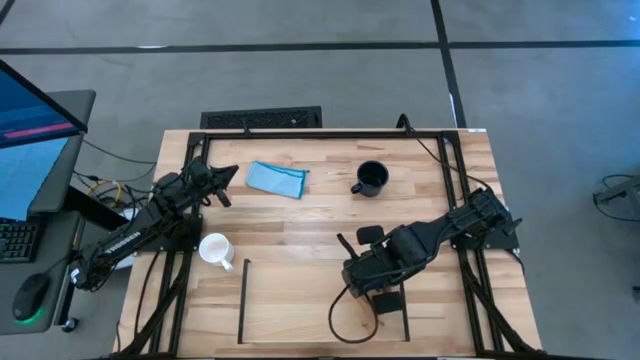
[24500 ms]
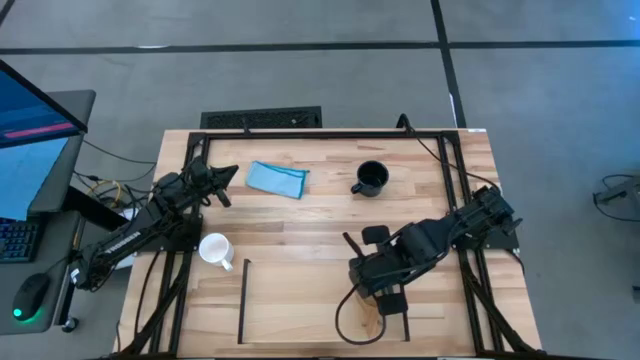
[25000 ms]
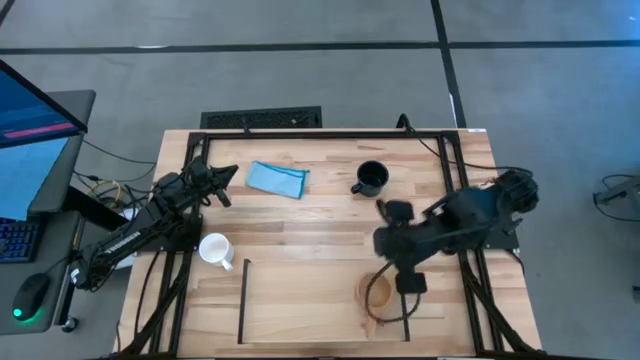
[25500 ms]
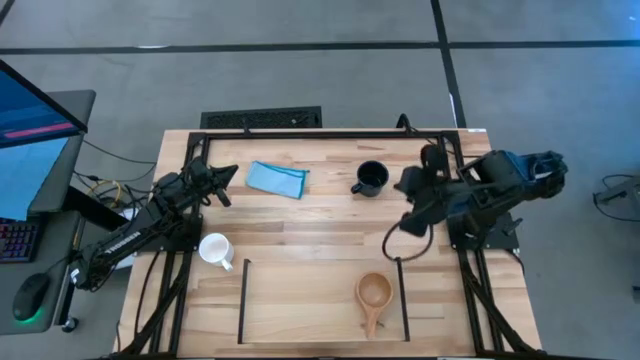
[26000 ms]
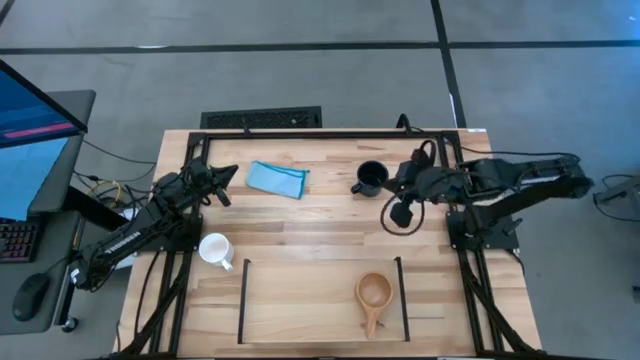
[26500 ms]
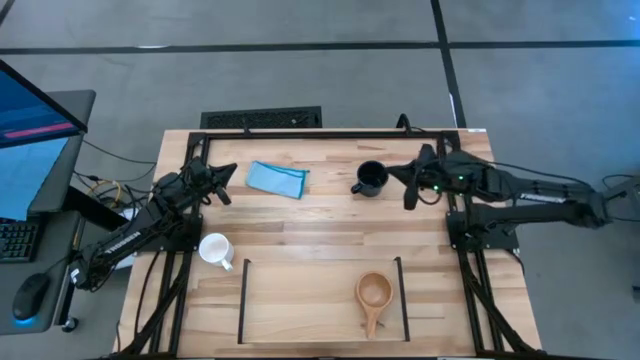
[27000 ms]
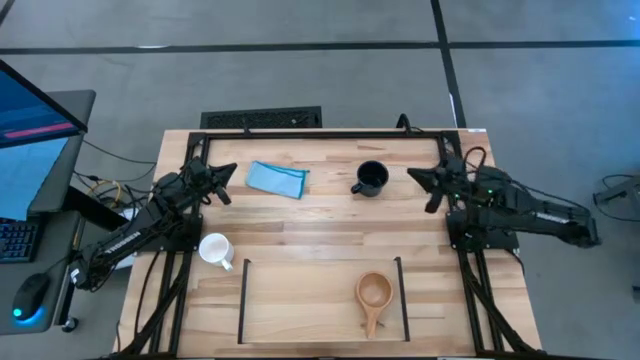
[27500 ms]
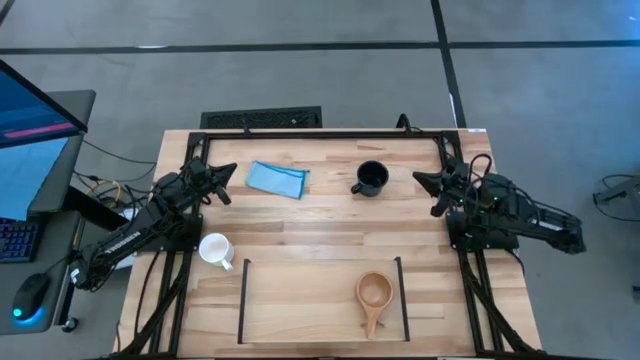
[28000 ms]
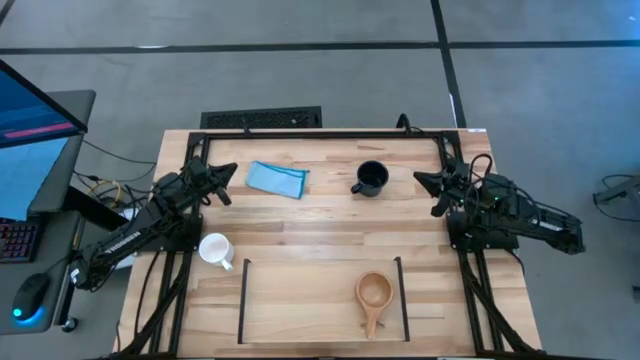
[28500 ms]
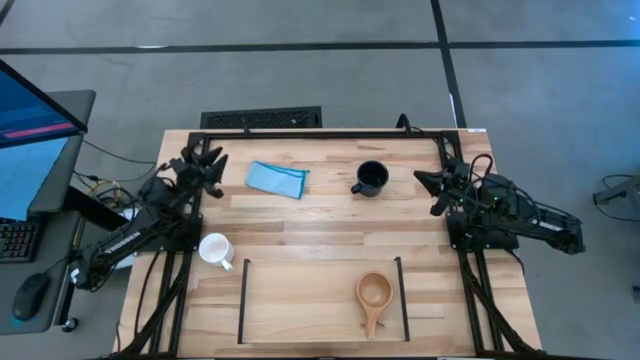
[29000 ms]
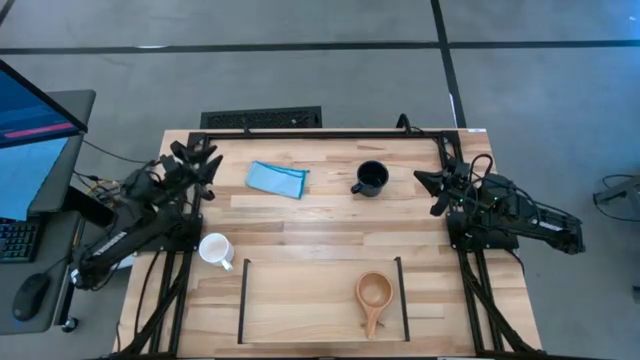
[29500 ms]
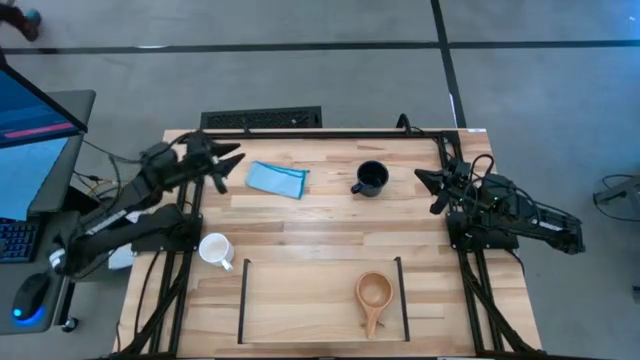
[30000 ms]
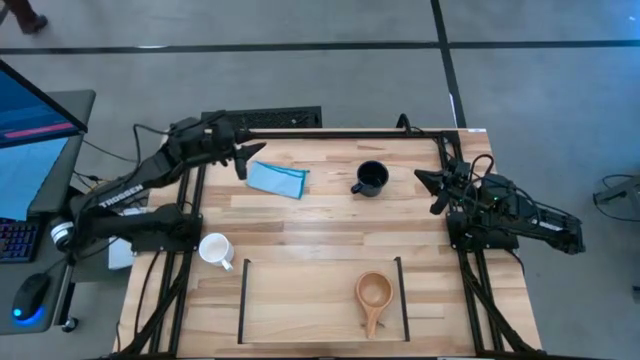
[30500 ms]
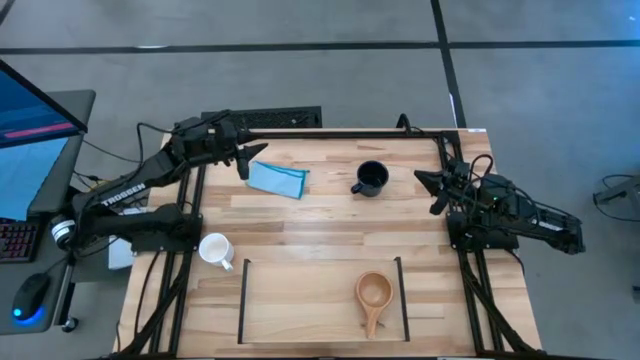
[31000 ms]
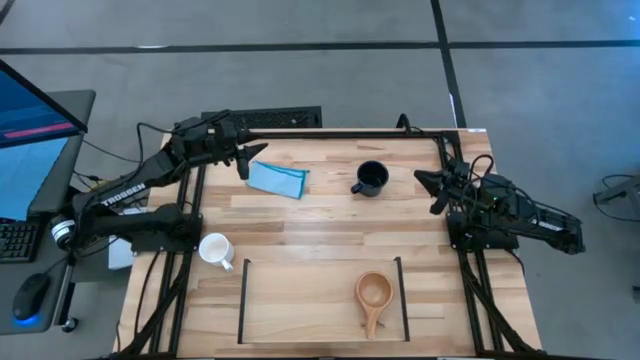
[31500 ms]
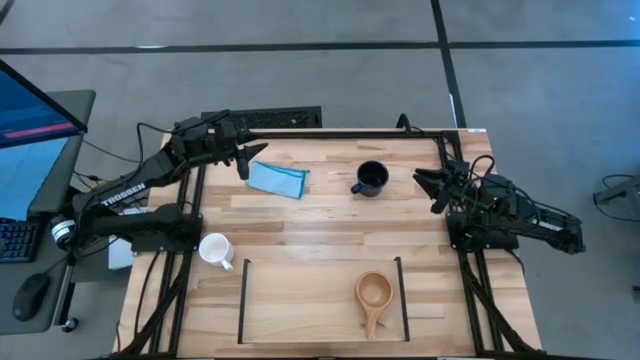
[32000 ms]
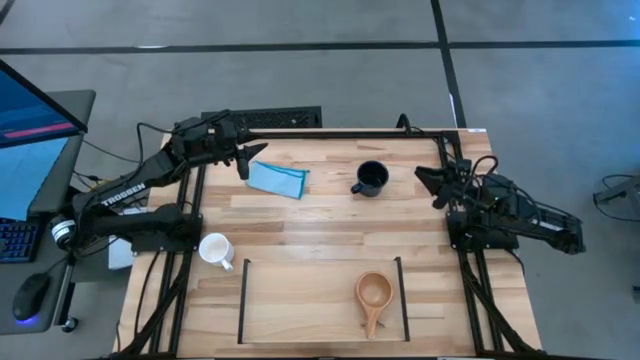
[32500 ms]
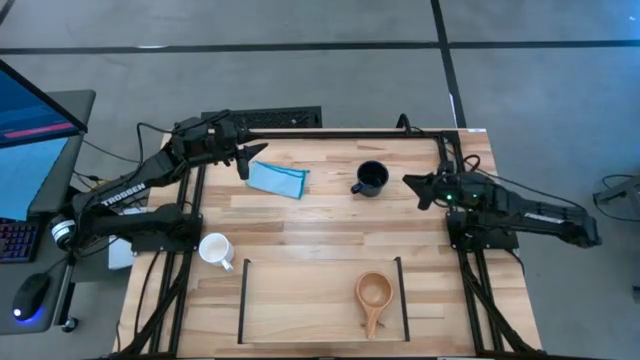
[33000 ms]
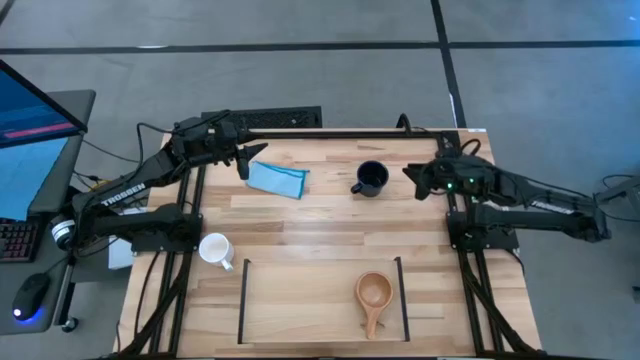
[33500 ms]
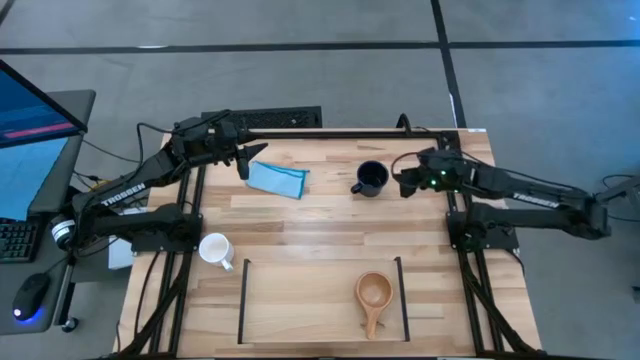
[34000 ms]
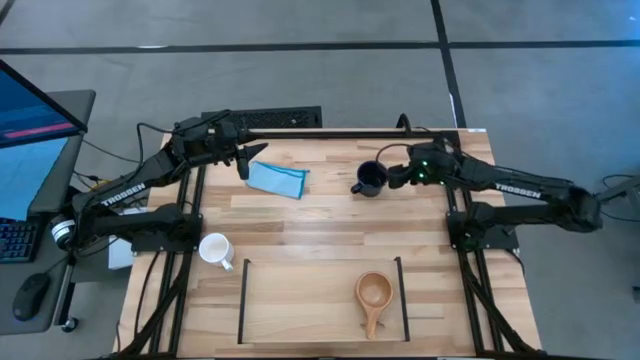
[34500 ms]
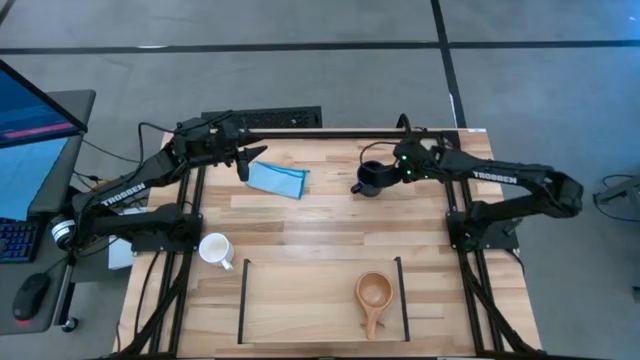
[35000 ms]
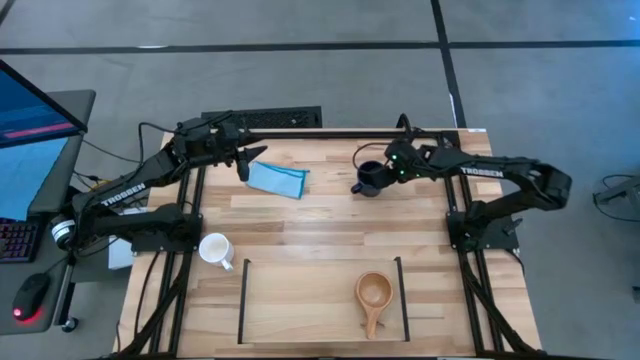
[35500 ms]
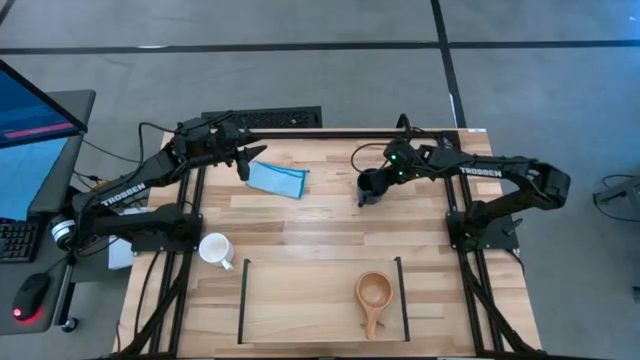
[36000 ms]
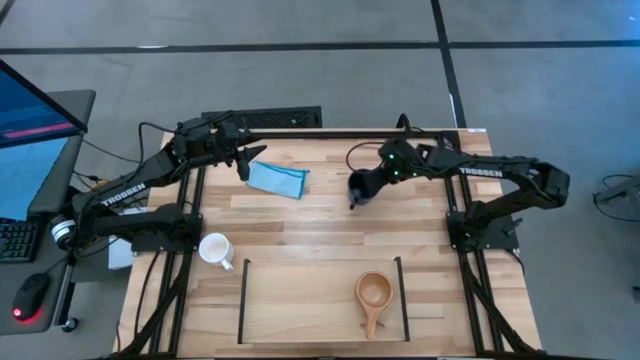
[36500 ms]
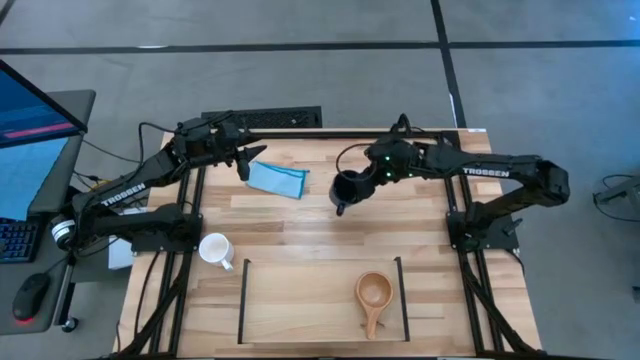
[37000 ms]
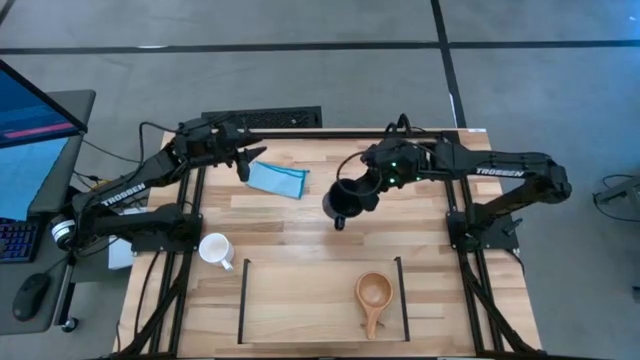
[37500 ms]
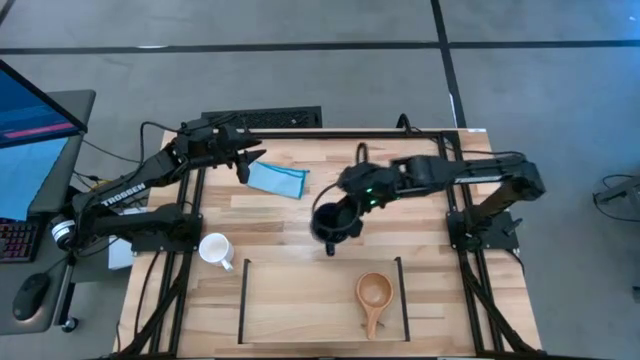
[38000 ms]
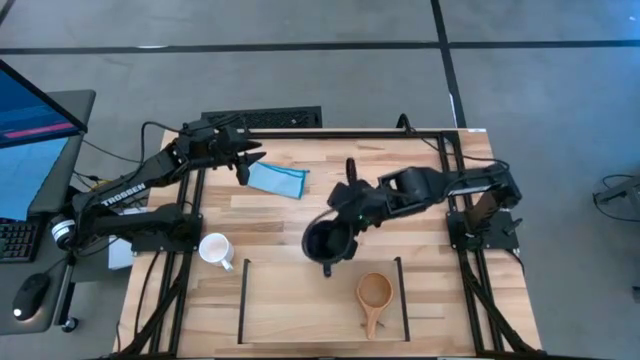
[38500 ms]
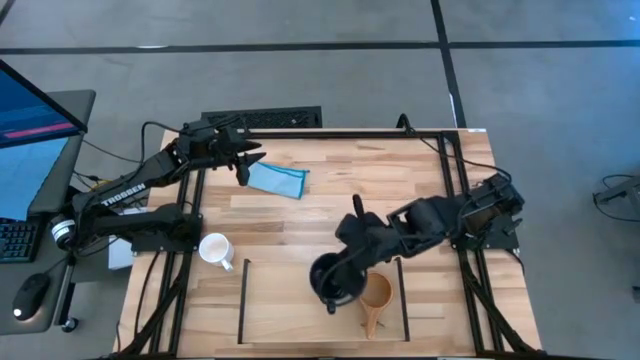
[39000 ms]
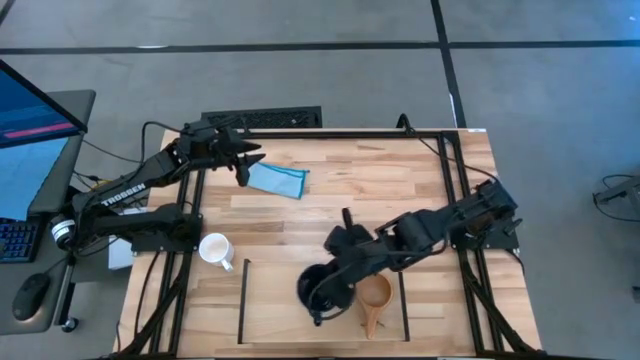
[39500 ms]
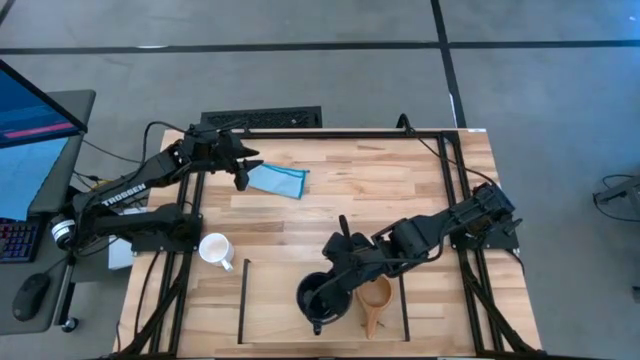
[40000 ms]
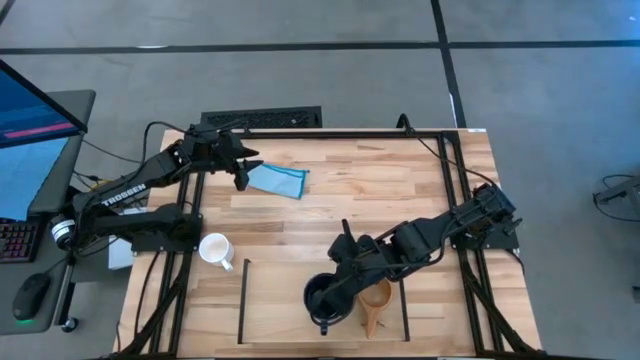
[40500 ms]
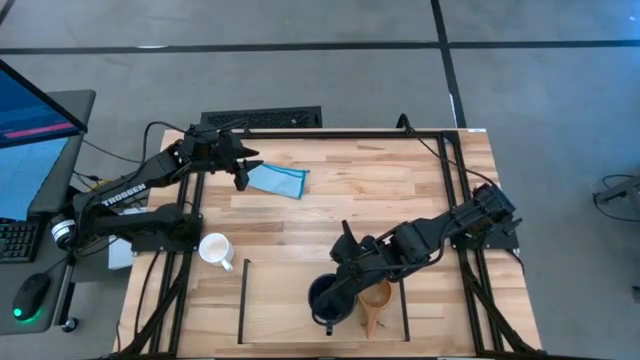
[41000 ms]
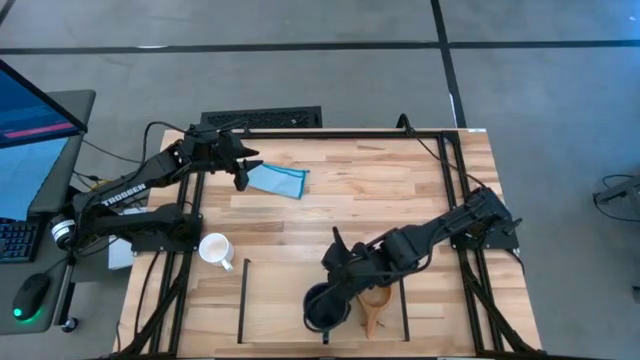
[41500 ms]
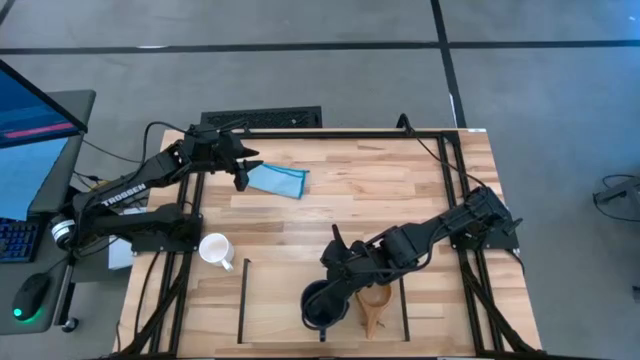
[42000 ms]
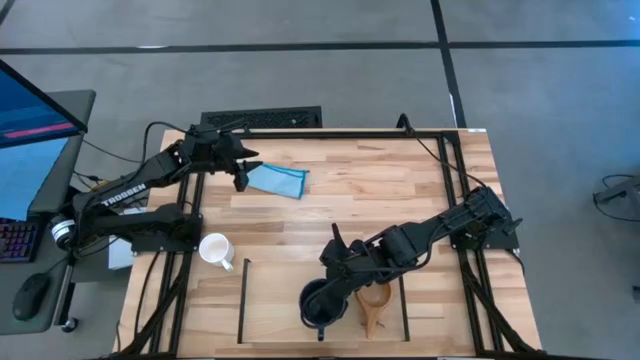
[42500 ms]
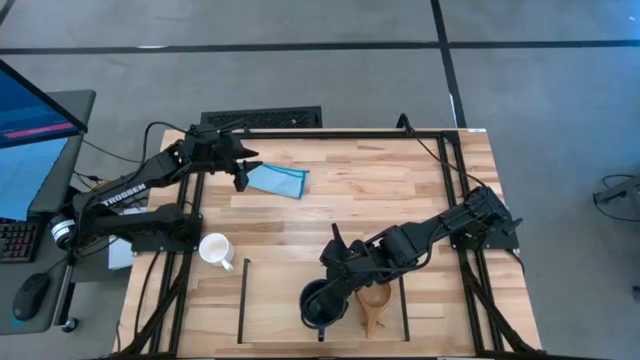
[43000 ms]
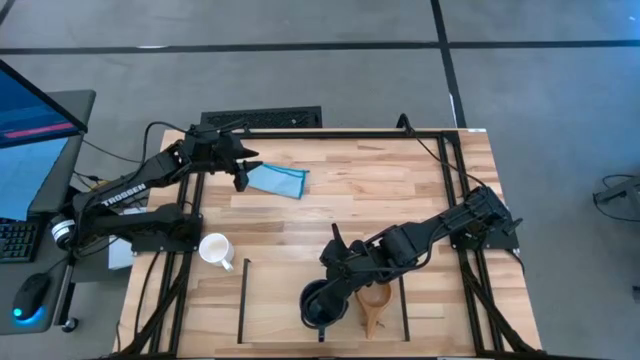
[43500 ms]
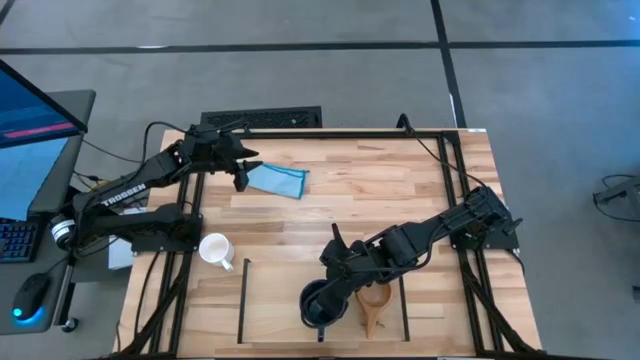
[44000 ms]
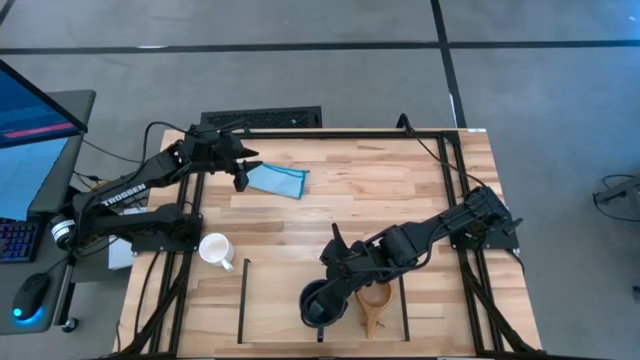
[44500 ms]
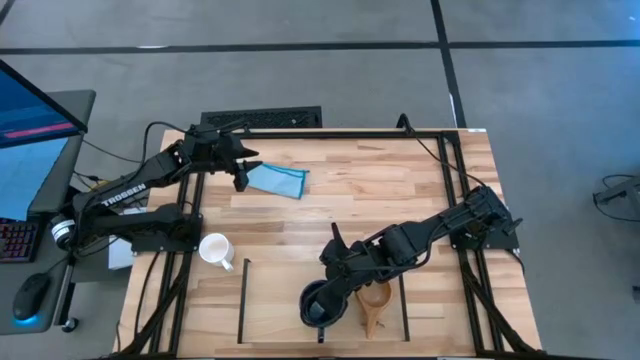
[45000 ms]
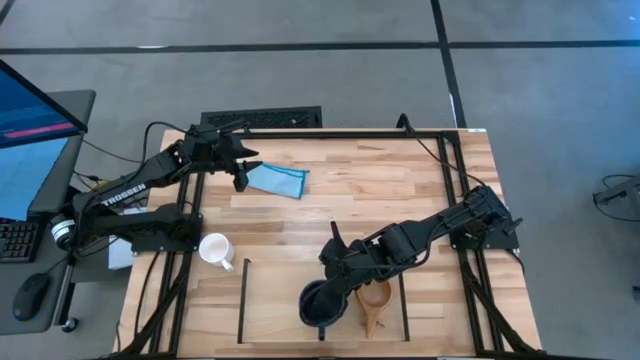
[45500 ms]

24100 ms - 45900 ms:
Task: Stack small to large cups/mugs on shelf
Put the dark blue mug on the shelf
